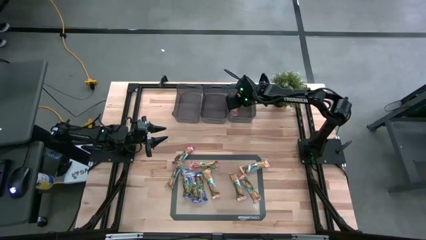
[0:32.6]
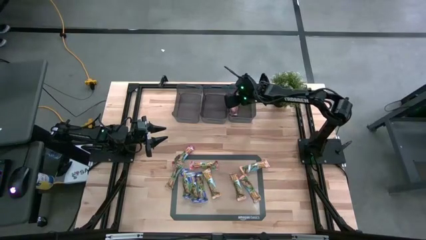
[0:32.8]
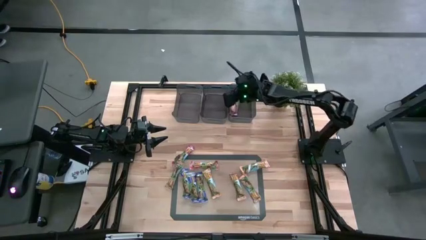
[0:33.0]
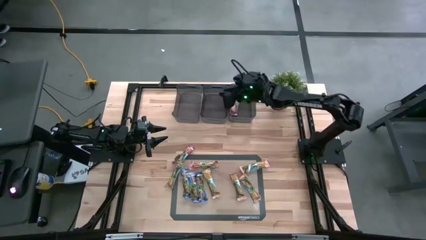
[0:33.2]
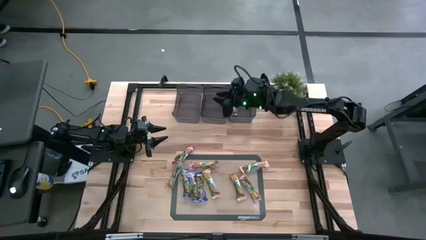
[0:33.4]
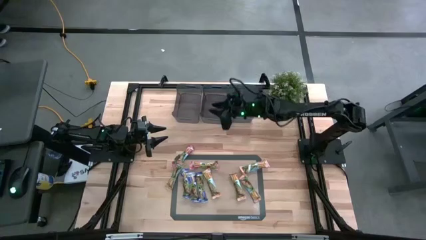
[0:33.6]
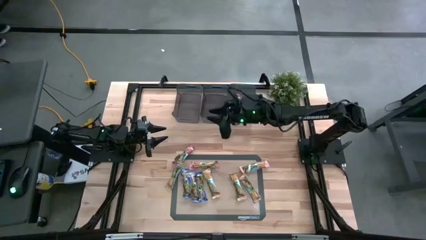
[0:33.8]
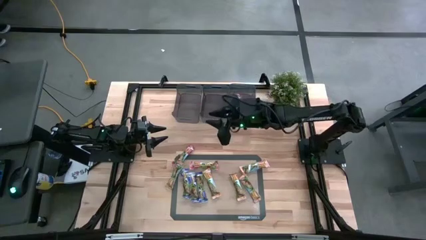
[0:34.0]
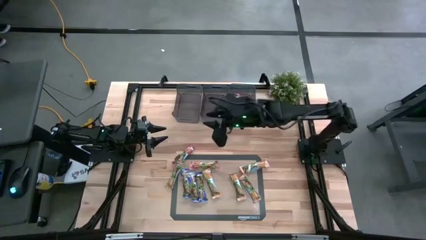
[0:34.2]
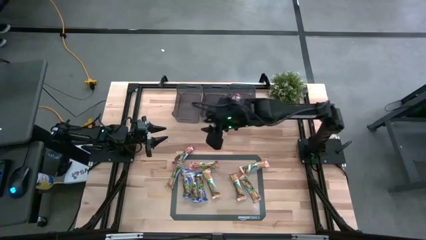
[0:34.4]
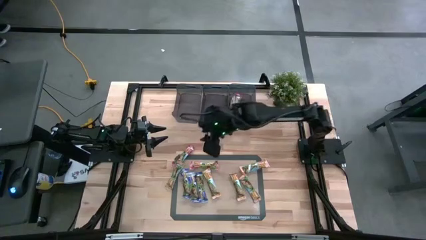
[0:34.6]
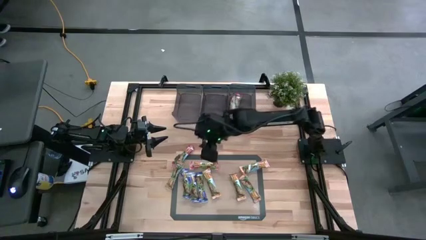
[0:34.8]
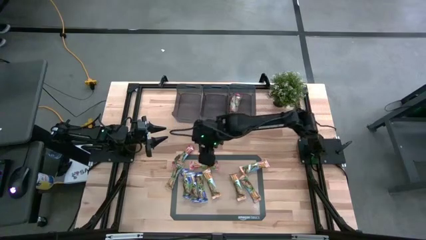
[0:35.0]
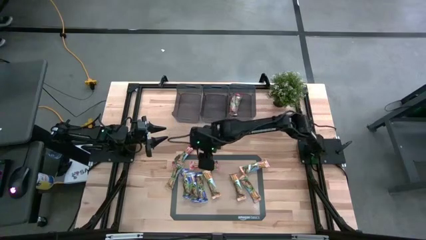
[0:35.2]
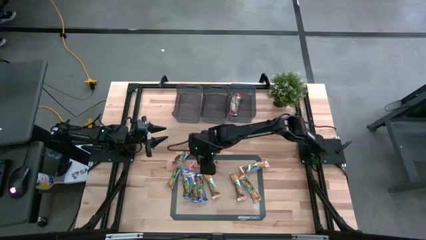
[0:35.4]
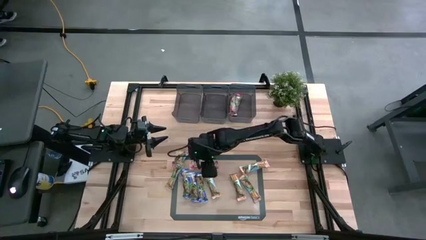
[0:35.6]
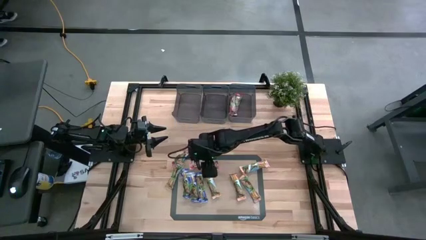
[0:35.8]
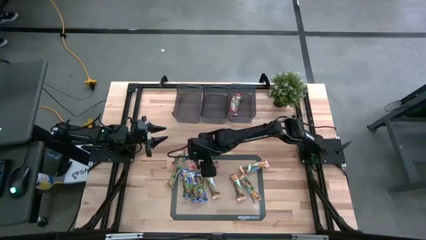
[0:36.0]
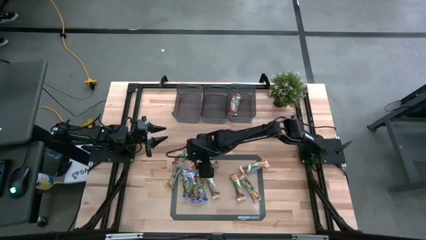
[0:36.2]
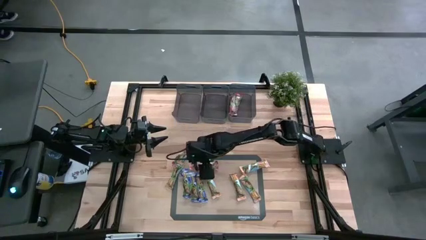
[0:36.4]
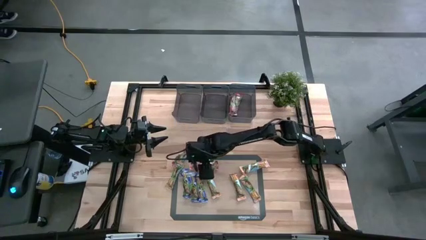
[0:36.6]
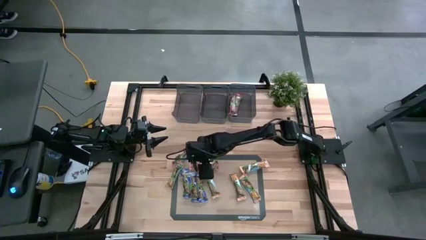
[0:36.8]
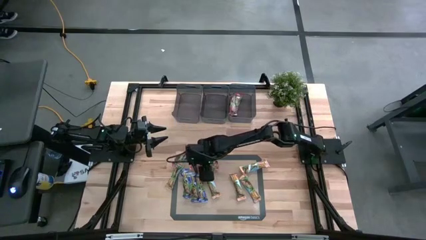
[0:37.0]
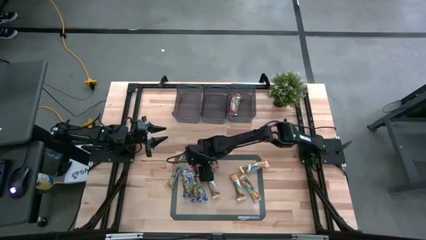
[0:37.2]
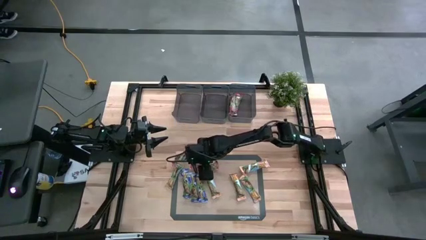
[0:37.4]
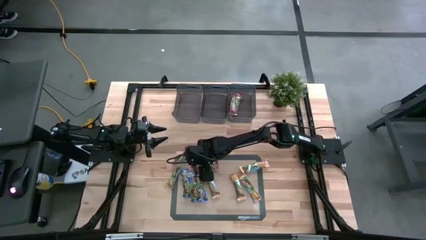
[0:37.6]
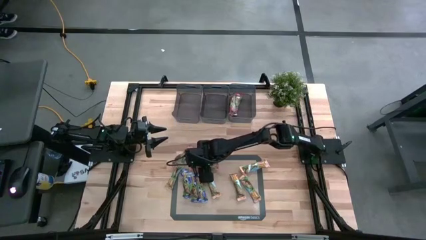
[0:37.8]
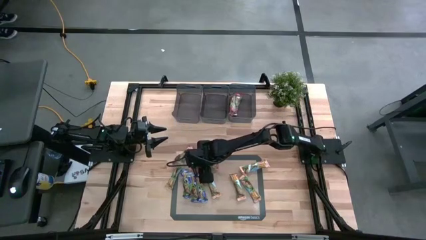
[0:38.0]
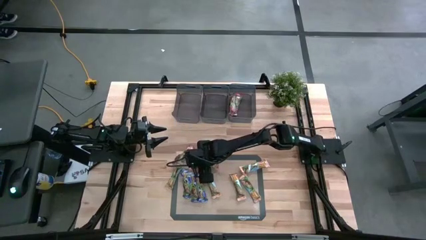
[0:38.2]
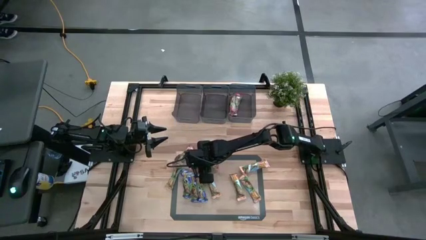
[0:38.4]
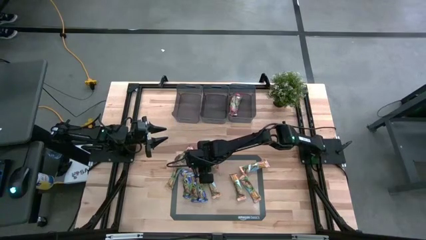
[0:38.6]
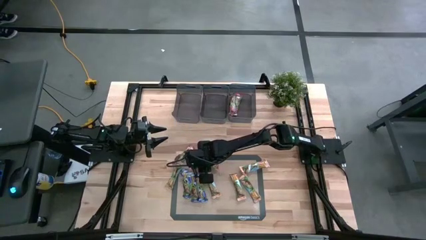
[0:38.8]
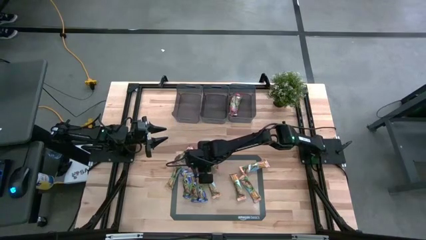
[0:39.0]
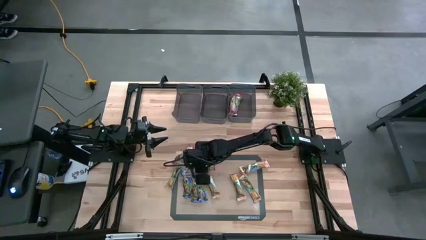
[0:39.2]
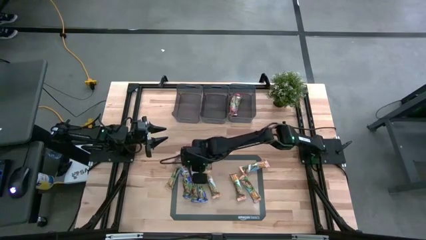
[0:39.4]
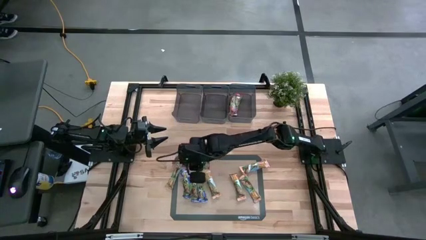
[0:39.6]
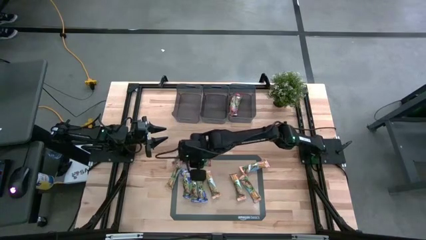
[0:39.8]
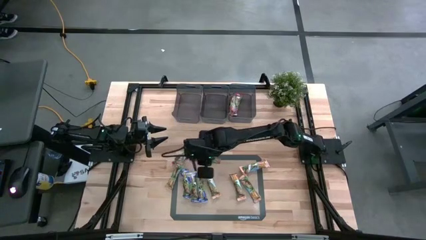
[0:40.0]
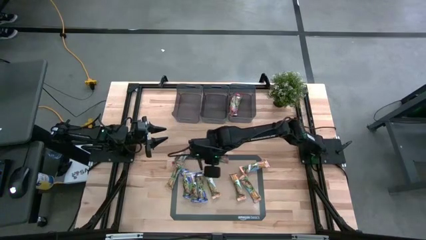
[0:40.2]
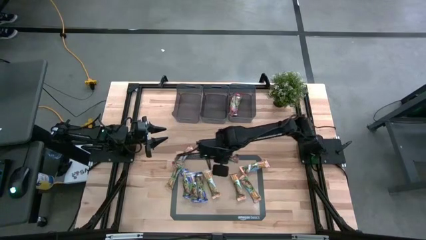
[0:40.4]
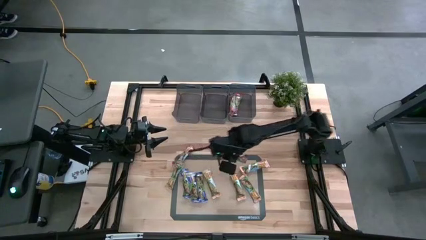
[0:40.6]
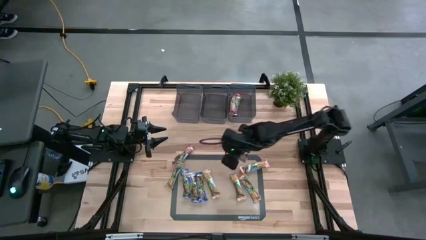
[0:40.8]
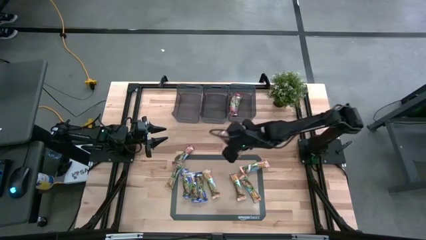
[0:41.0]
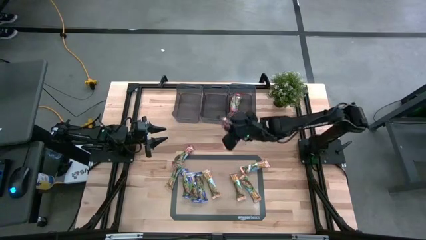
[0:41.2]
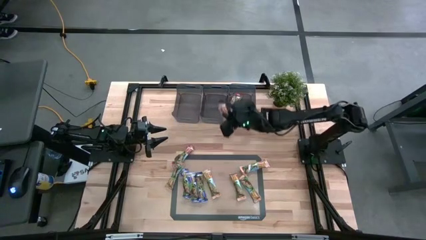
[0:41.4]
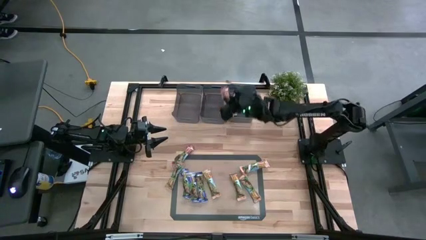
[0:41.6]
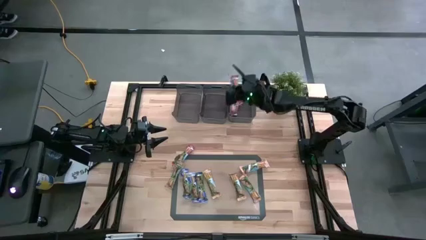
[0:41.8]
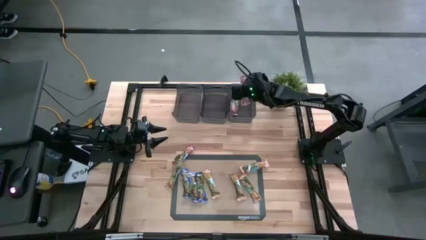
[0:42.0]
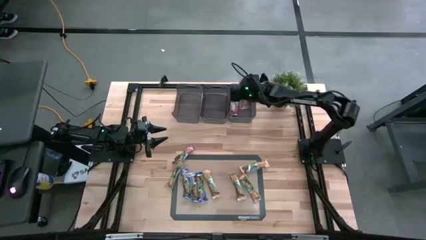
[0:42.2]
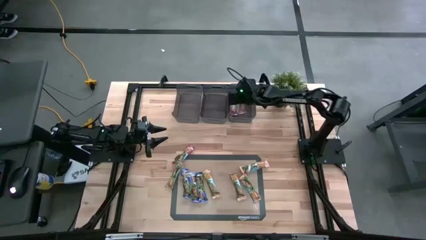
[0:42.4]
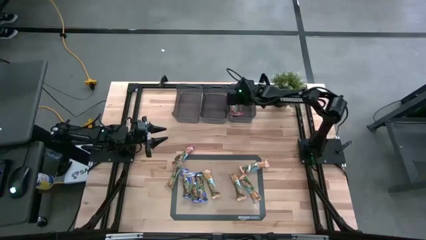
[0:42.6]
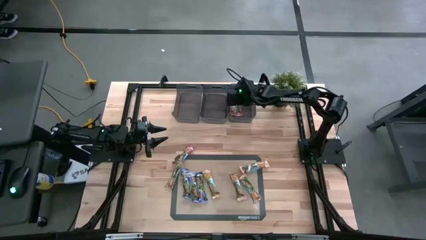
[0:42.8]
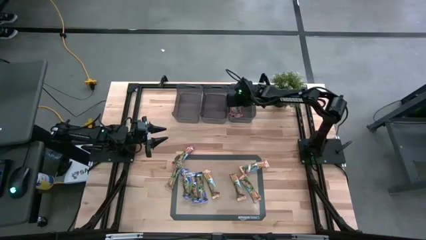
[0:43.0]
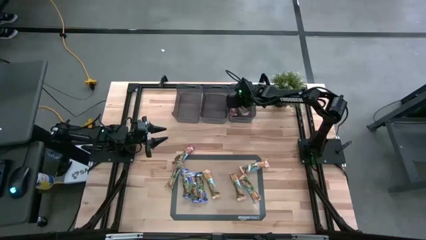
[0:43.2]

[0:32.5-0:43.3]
Task: Pick and place Granola Bars by type
Put the red granola bar into the right black bin
